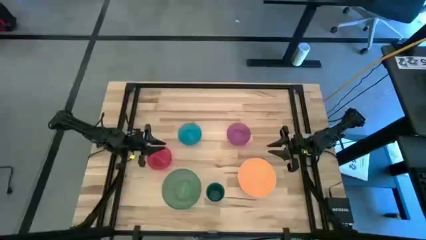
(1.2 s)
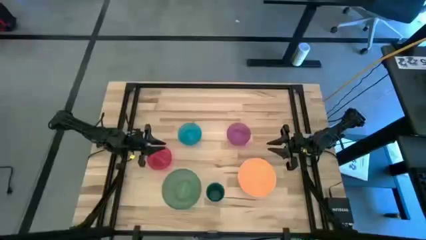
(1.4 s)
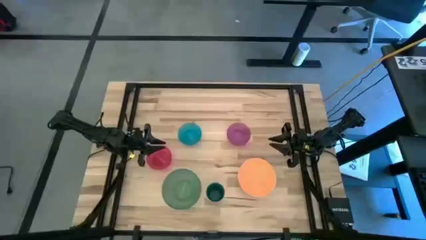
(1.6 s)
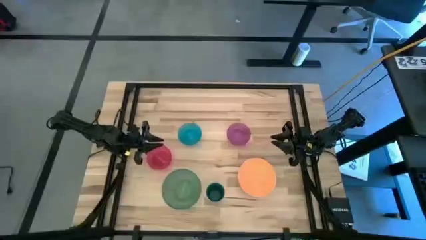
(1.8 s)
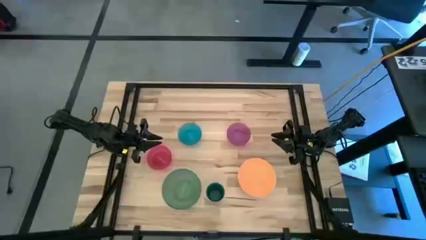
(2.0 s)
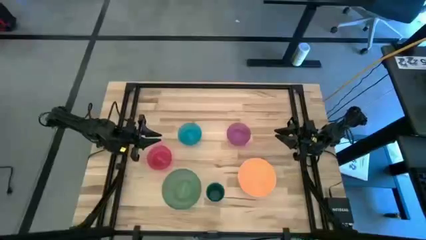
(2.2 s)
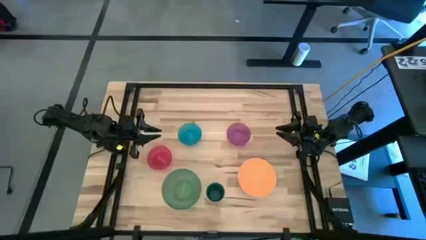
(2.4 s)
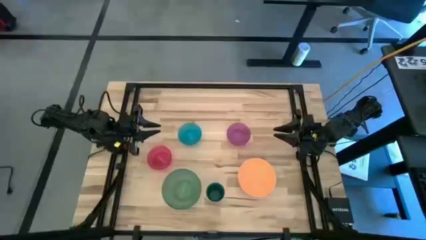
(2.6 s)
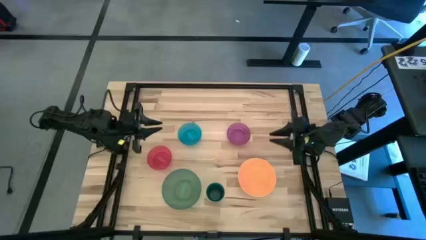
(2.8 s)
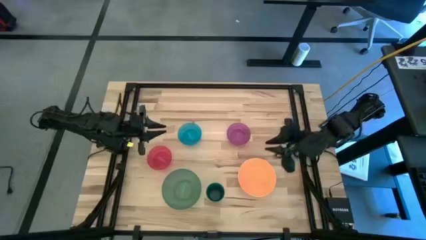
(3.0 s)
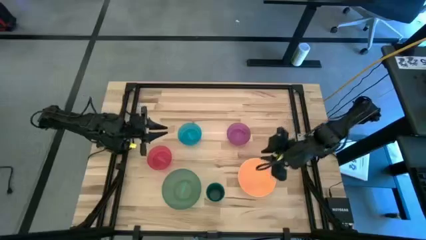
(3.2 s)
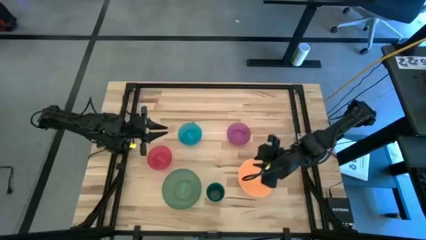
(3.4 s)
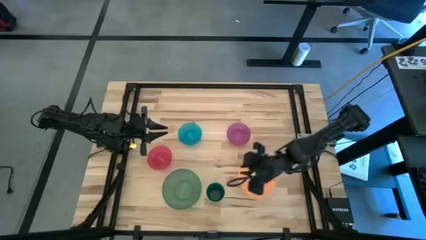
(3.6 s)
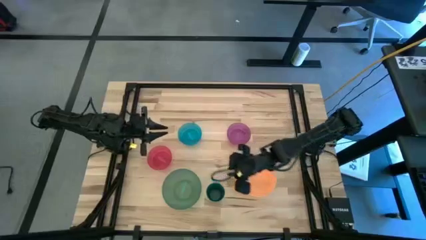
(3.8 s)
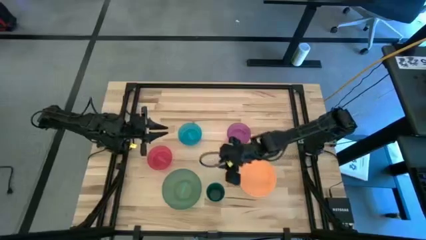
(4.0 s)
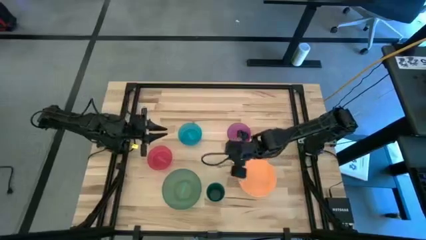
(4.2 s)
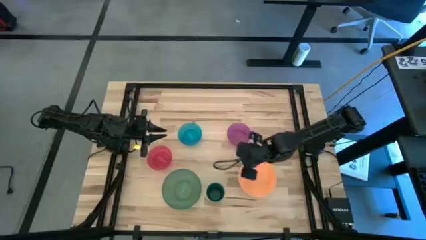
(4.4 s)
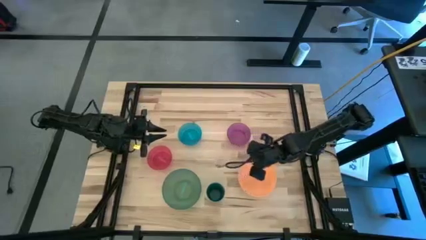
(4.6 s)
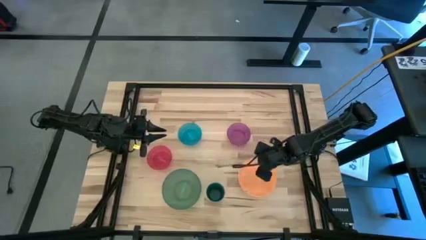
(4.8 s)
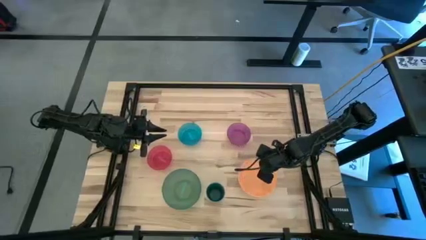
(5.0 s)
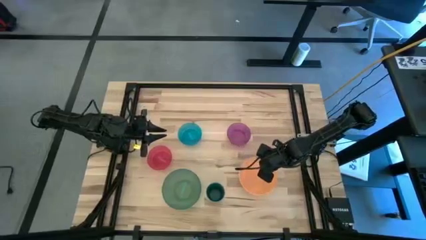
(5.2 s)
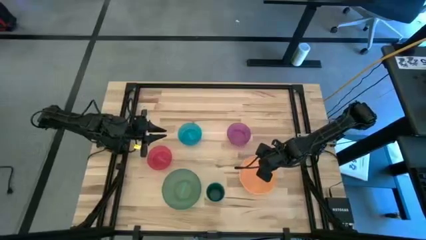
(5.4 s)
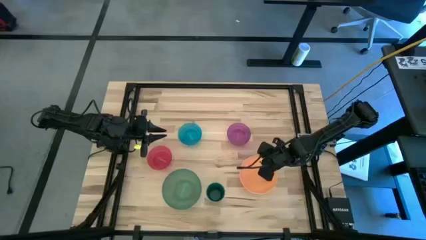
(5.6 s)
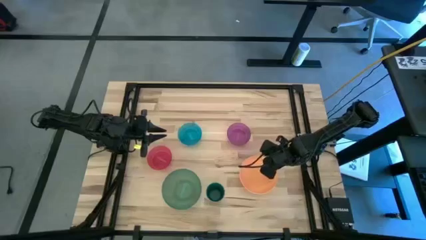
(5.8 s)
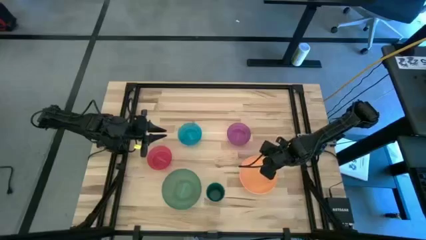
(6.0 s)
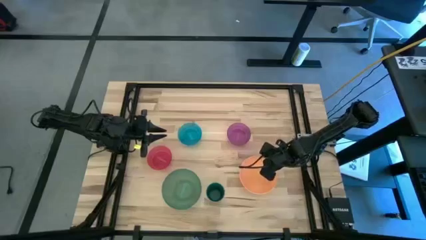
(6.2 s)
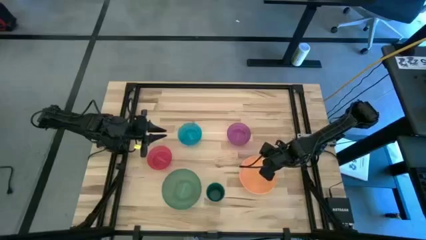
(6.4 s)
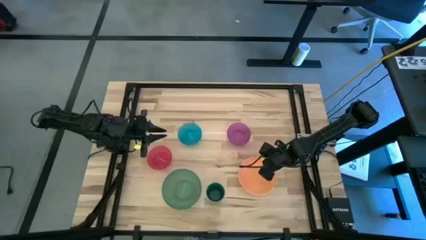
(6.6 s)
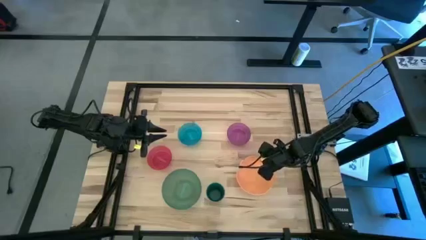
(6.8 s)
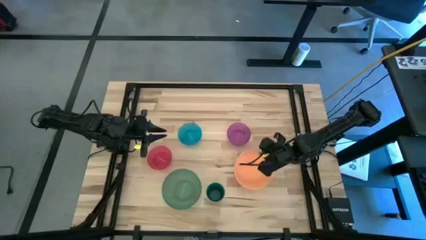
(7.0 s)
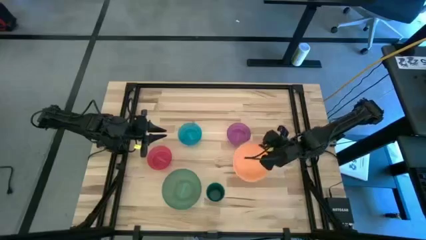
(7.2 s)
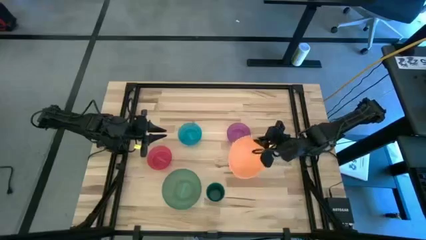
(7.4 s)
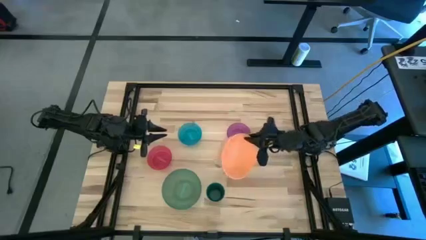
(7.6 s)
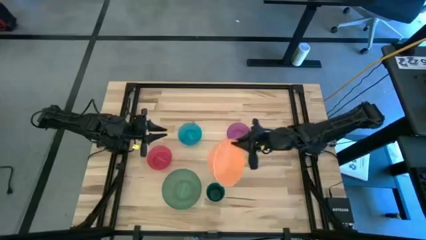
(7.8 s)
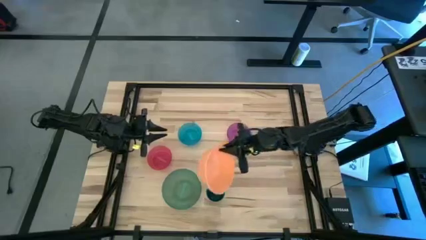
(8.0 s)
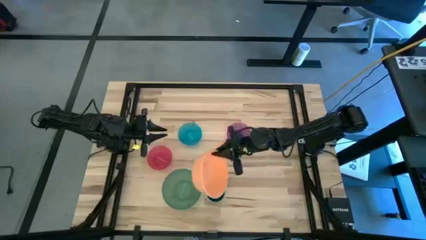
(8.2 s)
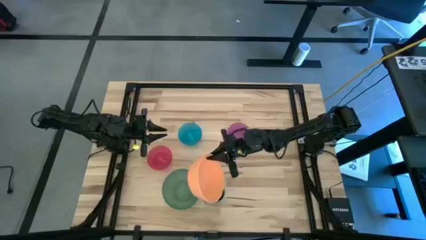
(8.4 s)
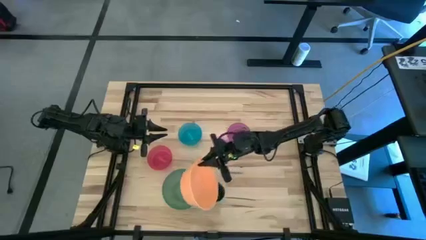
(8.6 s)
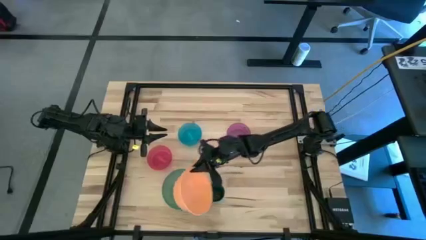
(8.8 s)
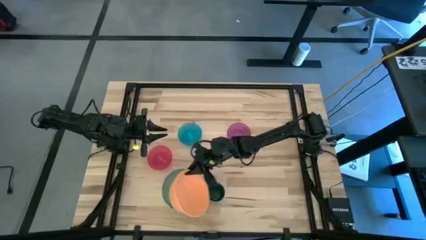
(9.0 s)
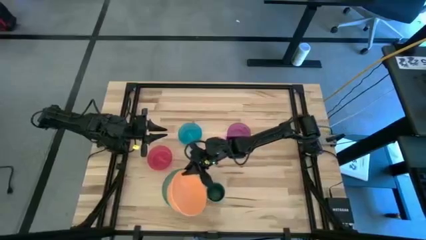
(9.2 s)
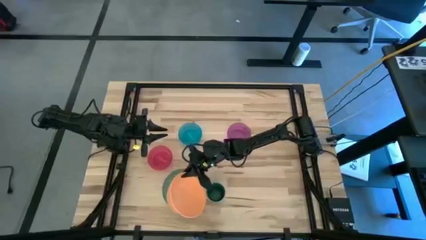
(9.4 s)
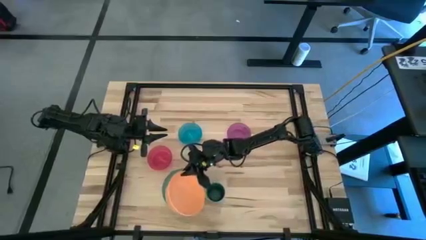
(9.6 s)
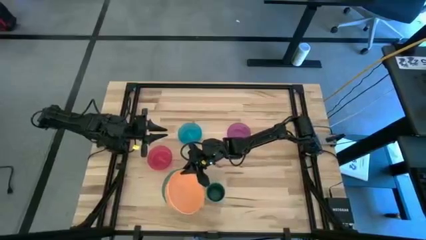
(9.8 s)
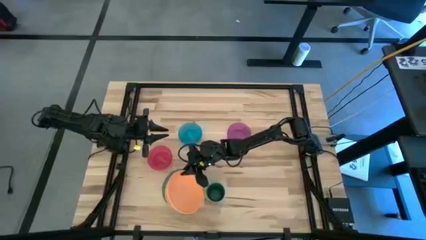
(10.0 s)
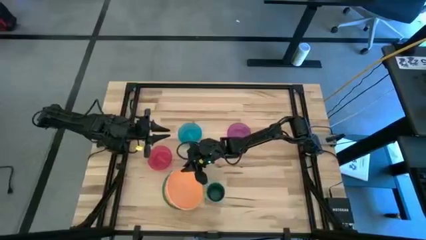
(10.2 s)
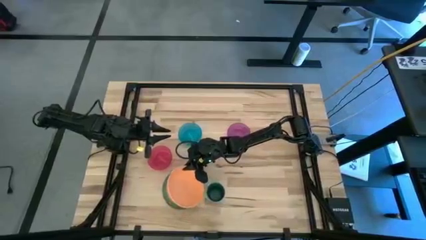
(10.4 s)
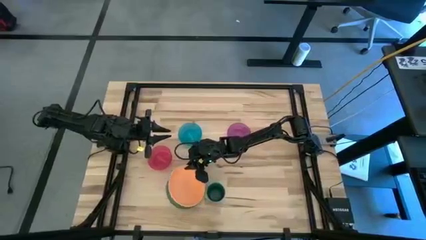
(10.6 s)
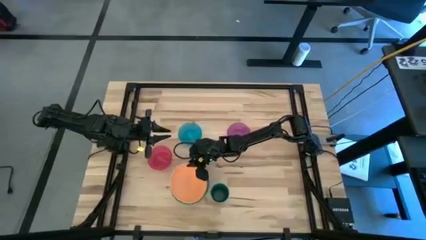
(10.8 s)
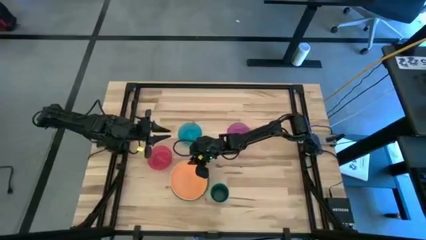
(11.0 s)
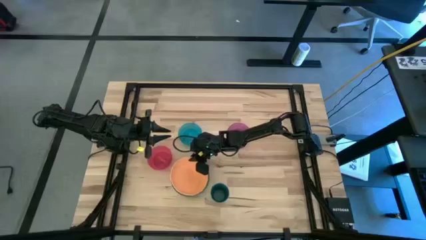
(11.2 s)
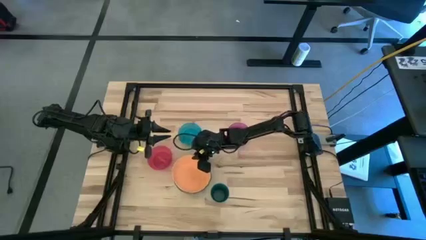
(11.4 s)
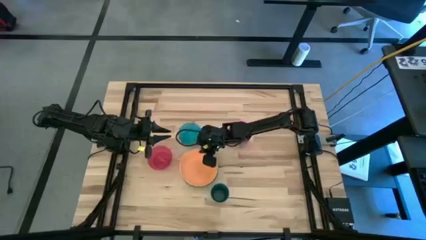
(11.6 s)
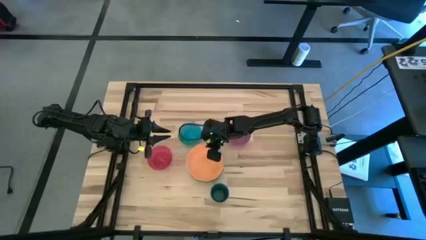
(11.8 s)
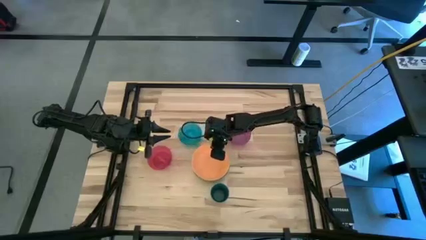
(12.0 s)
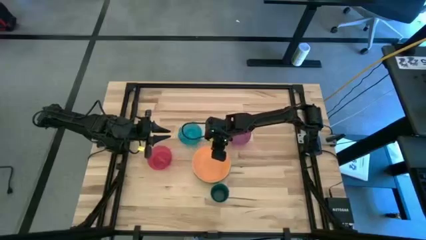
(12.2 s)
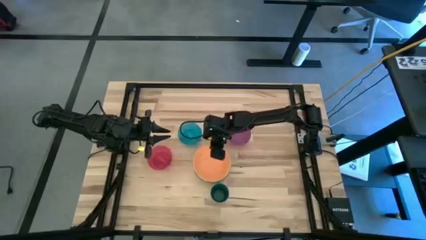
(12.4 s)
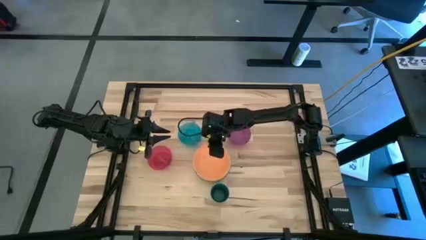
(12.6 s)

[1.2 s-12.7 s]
Stack the orange bowl on top of the green bowl

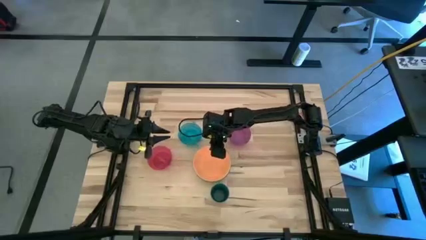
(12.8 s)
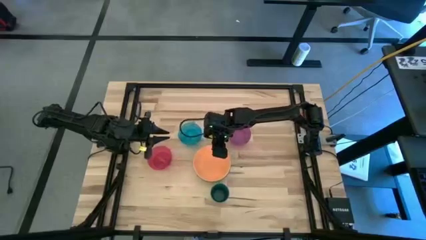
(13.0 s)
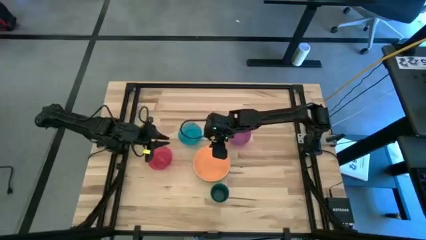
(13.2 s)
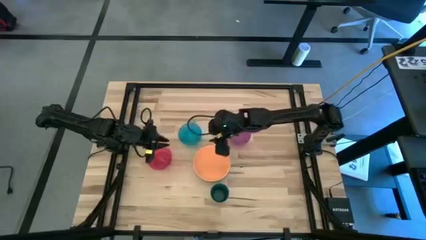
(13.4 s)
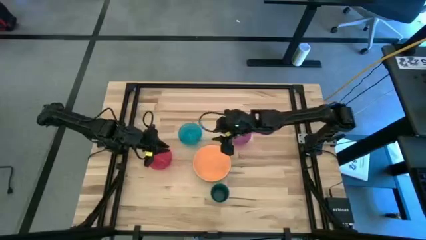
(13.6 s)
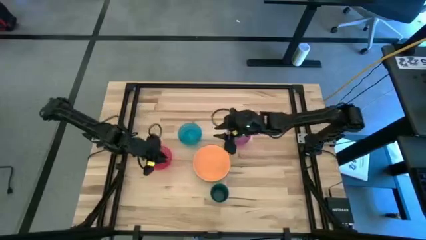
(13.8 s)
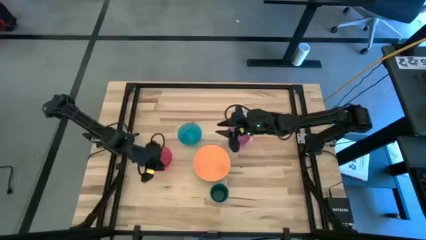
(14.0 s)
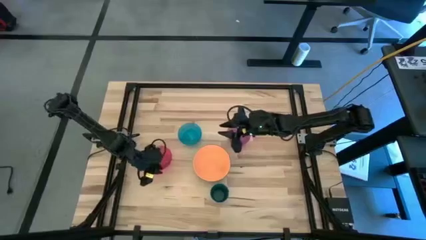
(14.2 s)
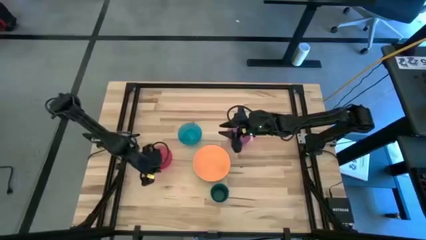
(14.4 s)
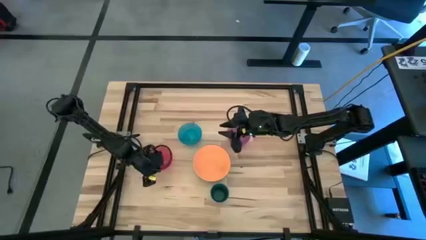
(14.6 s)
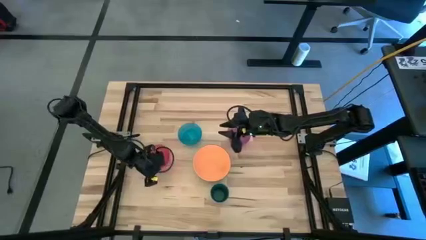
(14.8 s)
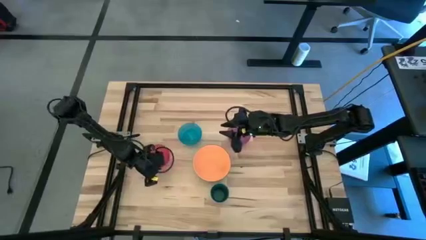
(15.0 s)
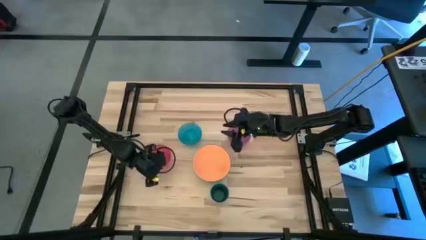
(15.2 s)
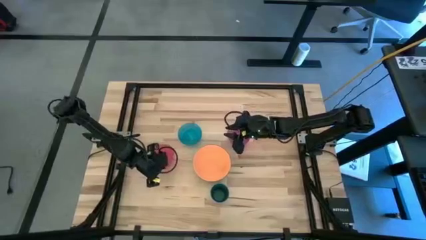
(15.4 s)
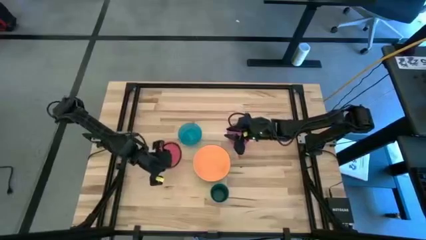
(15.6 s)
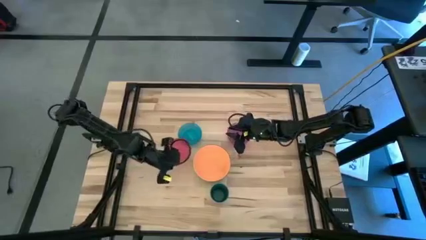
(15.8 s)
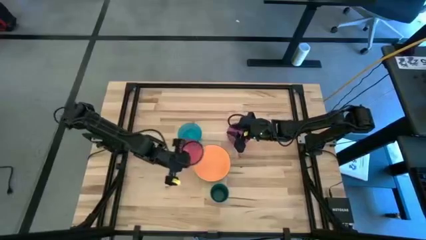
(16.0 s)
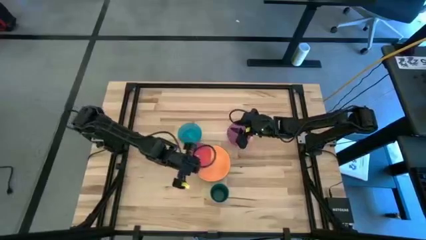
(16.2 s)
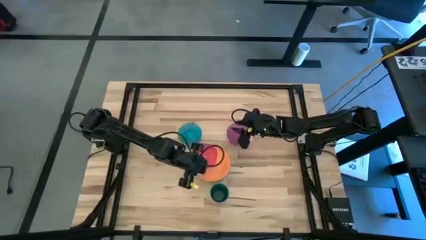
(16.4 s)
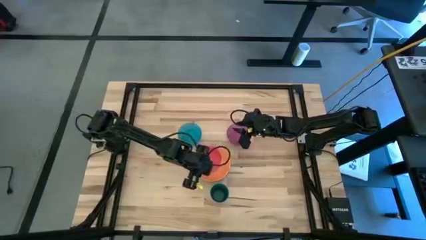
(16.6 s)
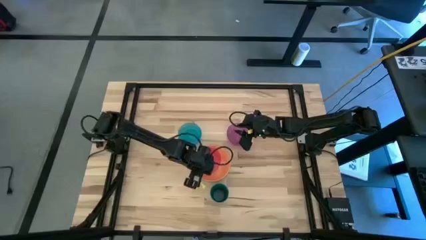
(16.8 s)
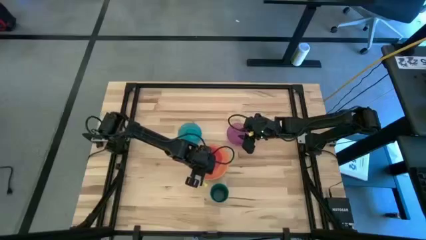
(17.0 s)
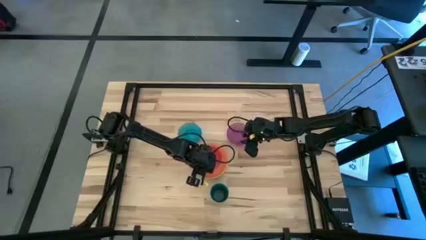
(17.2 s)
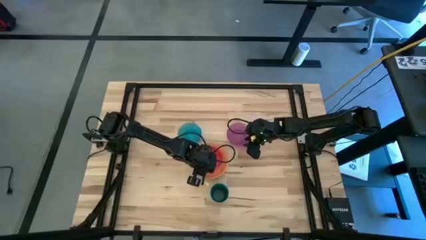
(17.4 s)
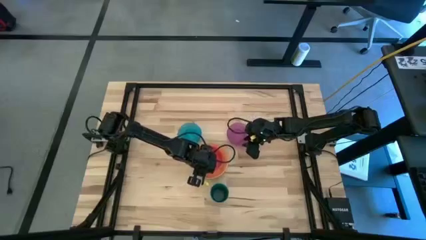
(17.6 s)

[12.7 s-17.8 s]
Stack the red bowl on top of the orange bowl
